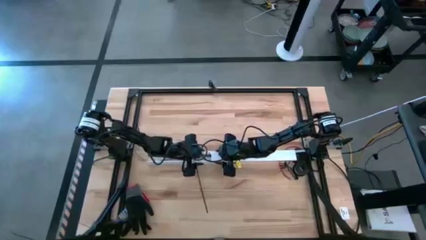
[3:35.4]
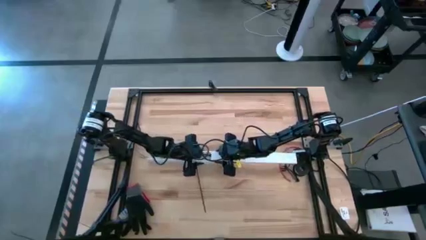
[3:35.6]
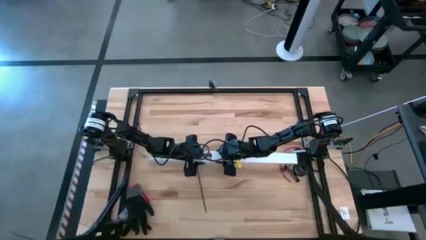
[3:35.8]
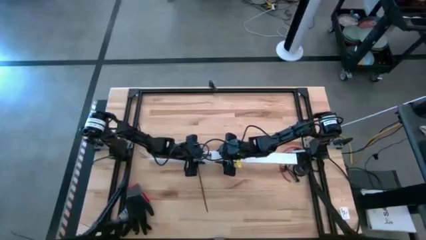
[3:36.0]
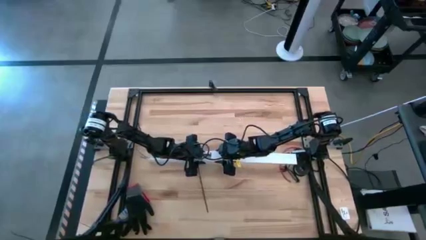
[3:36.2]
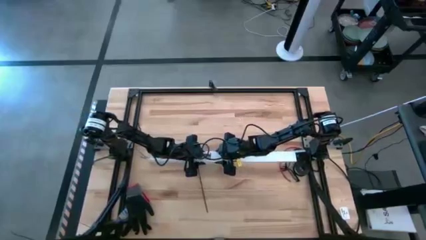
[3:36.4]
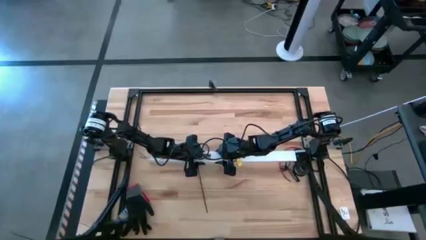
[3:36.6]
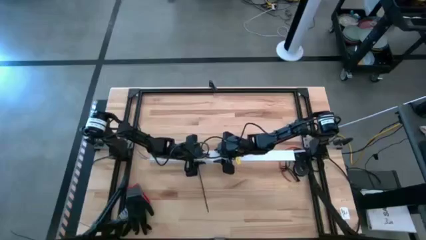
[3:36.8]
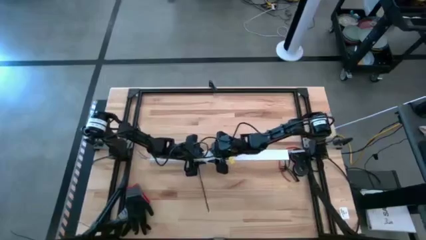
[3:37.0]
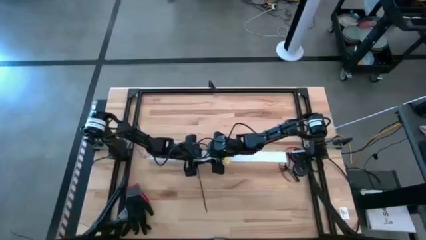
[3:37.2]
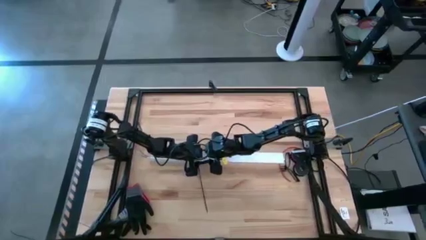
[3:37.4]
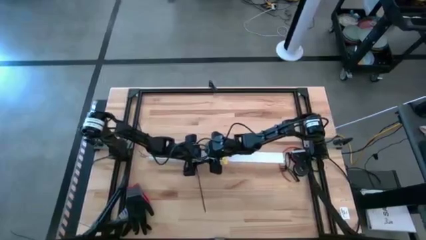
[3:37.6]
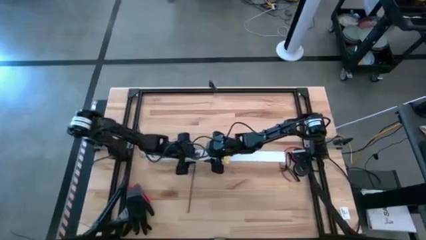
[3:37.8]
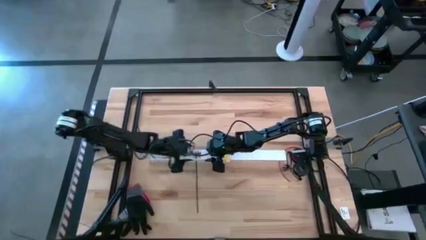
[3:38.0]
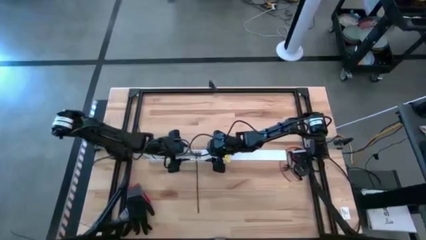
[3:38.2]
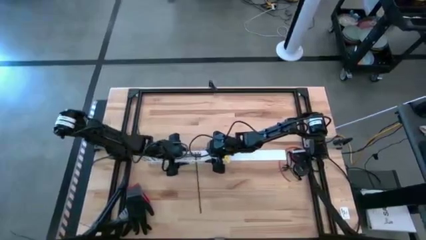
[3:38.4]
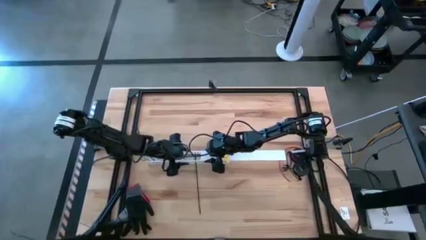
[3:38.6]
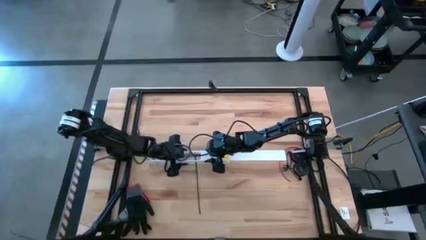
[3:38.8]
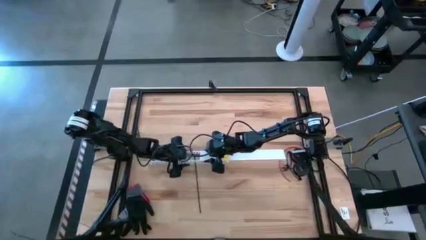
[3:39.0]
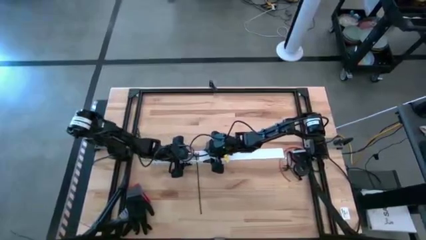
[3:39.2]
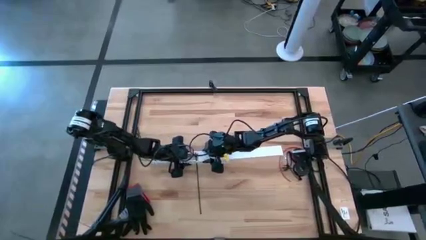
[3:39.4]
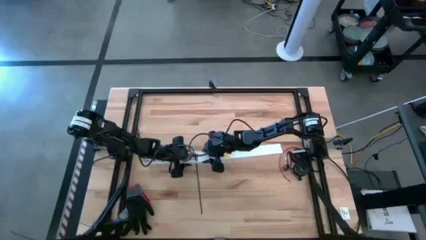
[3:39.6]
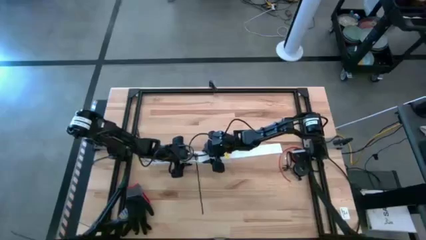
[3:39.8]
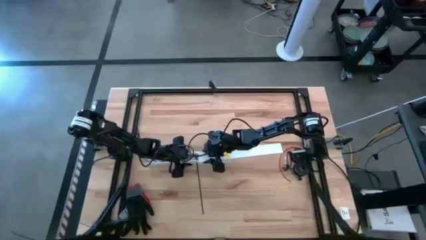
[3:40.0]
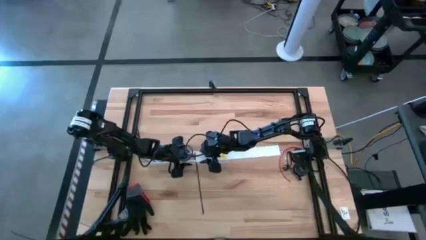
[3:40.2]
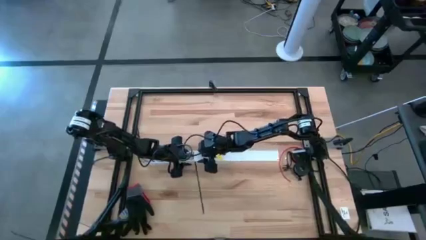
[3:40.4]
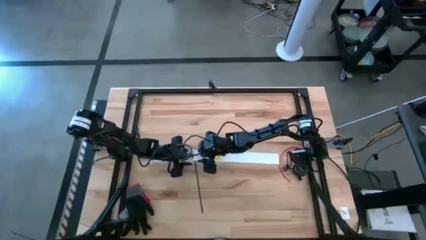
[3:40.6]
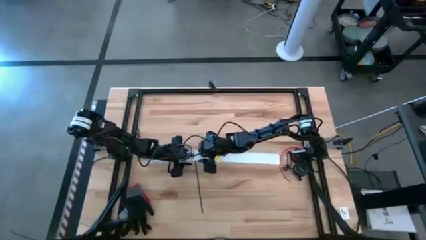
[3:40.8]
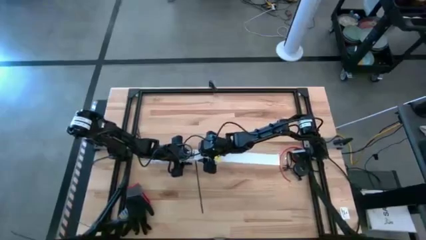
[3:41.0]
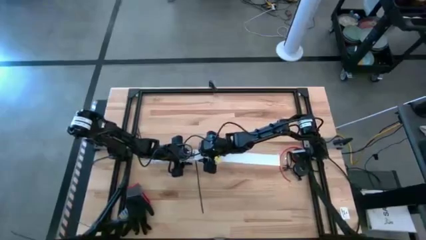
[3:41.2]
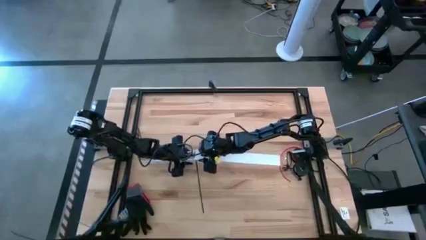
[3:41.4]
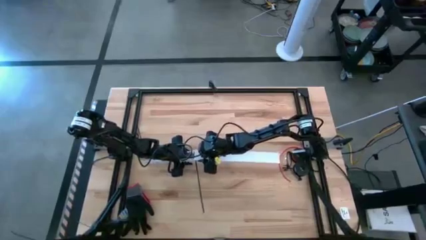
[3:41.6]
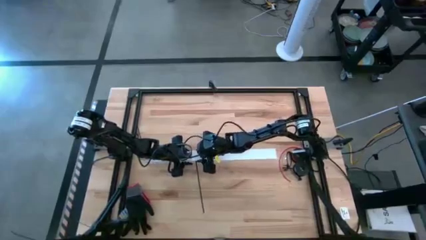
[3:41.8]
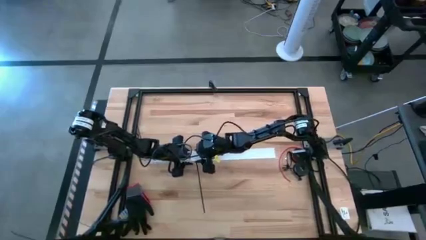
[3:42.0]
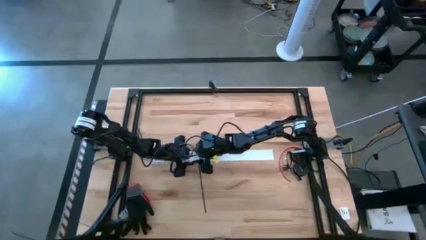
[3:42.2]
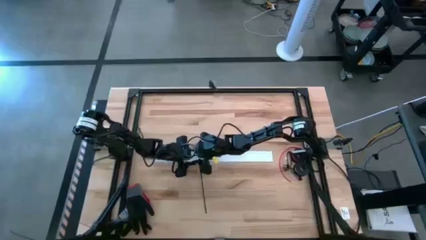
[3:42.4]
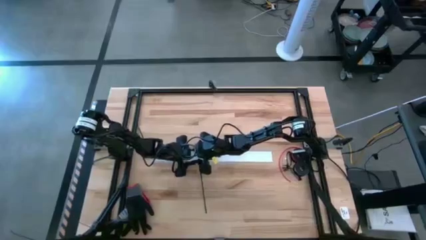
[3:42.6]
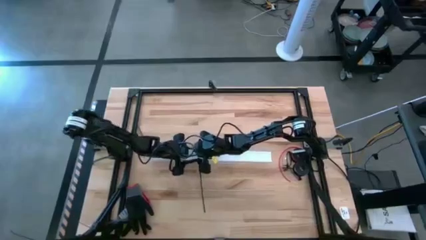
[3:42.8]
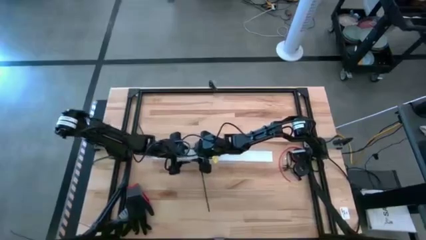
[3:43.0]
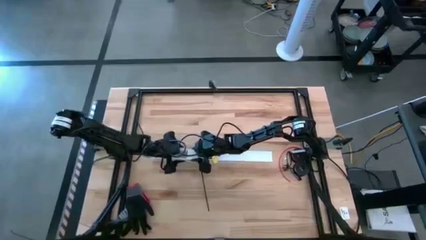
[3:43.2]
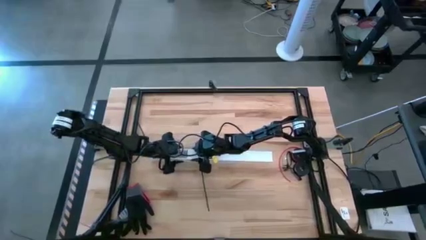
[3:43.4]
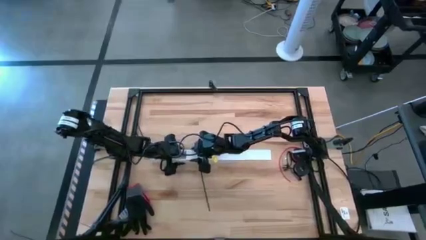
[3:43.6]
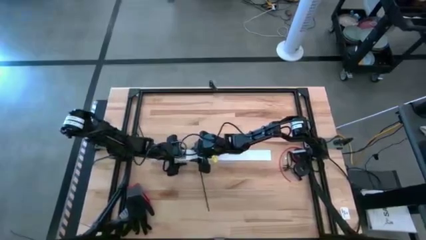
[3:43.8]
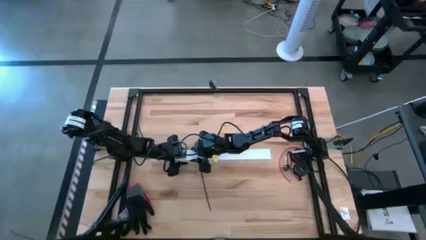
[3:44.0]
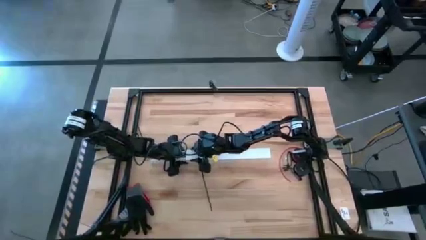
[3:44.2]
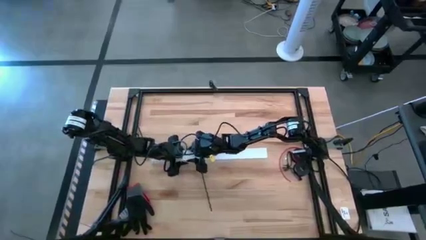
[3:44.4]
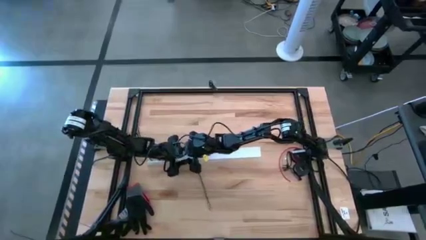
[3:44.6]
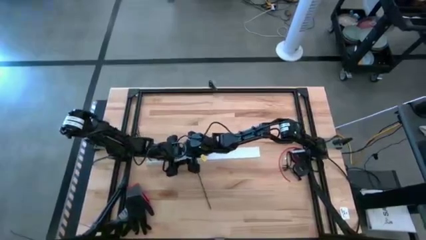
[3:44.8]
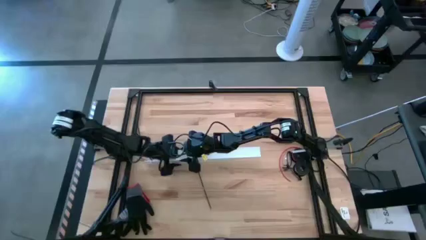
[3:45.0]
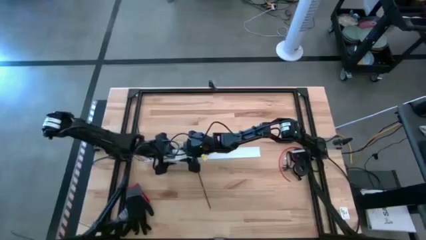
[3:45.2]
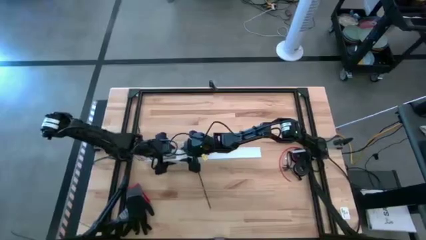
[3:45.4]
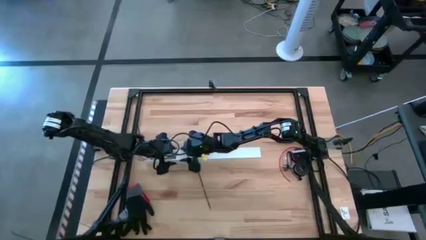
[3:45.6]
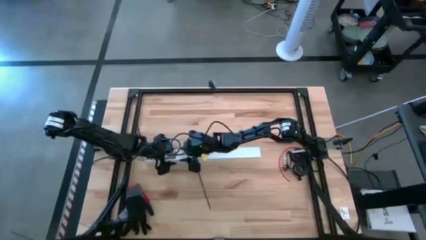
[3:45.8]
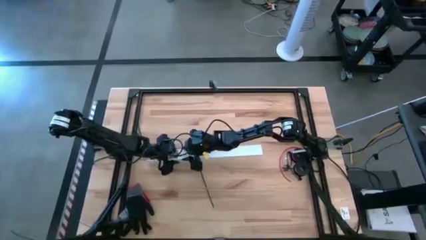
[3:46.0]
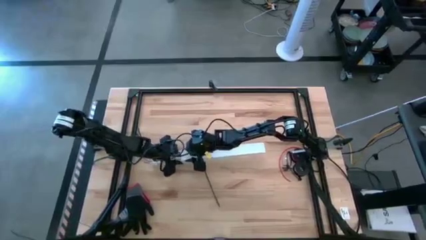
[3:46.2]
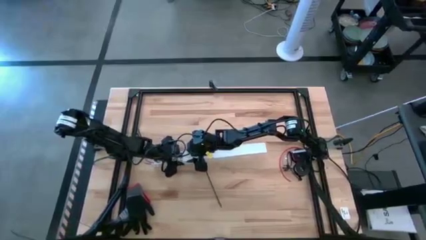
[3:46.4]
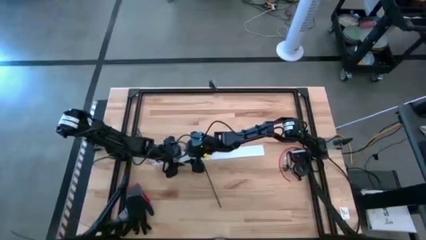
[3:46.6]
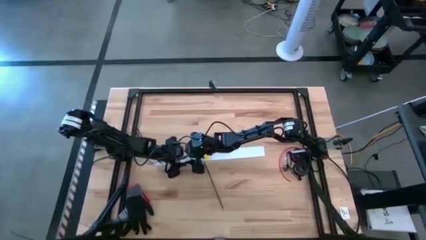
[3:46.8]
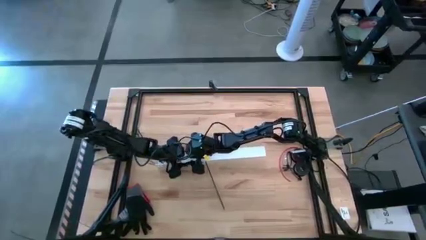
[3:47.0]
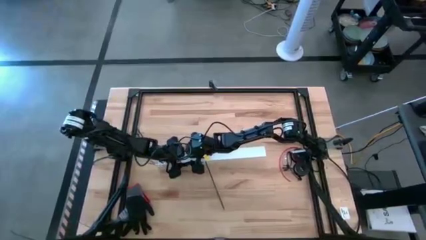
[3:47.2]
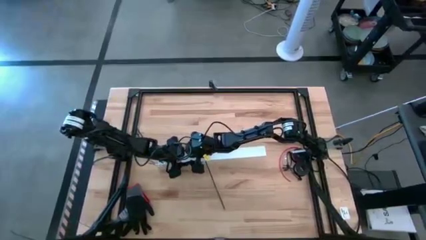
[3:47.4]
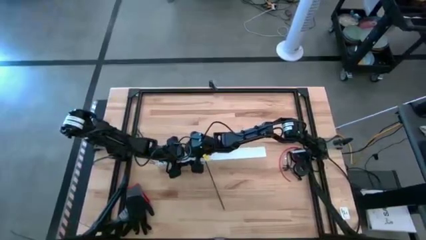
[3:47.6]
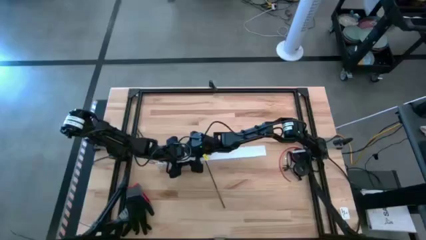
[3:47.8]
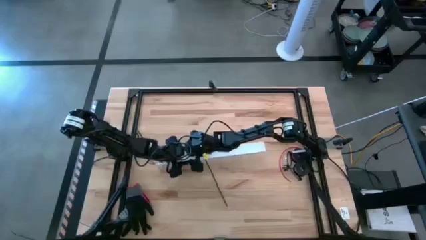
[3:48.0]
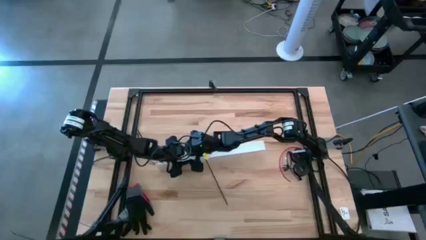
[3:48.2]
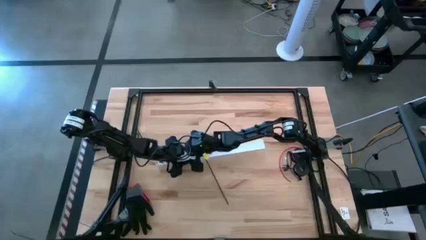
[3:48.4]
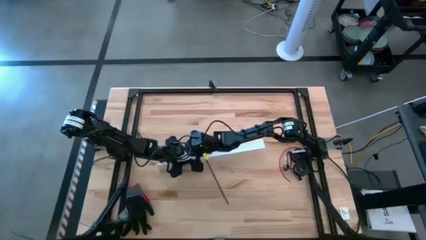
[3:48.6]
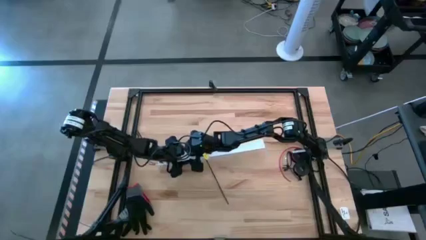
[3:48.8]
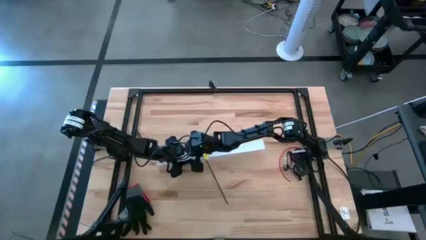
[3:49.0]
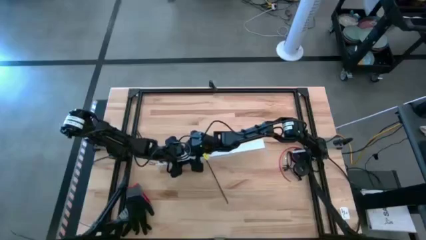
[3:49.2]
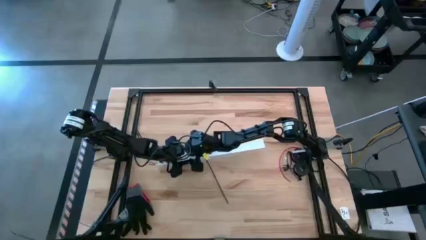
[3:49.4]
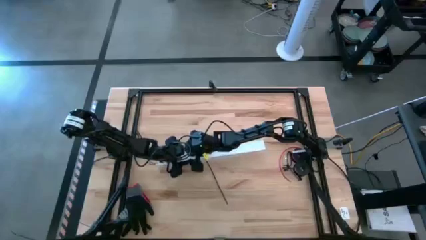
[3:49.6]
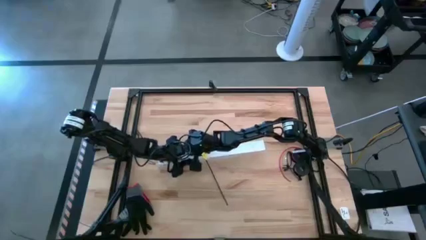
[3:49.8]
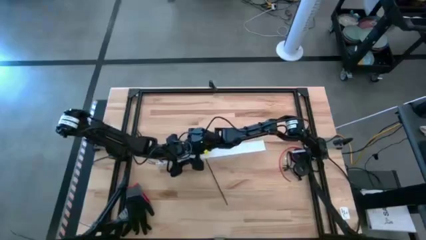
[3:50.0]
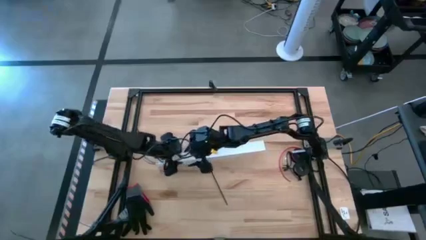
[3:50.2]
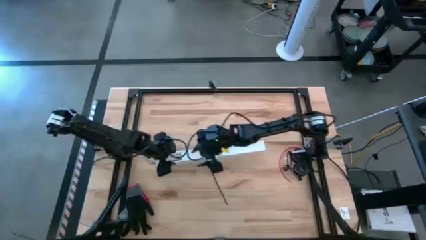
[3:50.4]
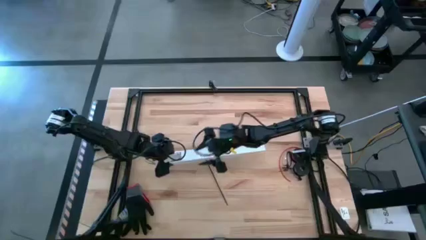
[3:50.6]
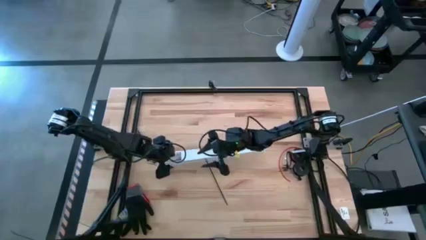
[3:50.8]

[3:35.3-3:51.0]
Task: Ziptie cables
Close the white cable duct

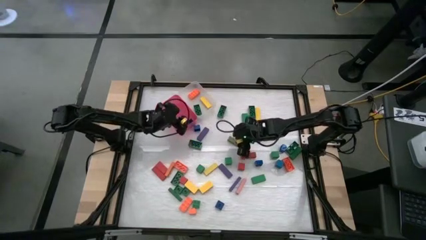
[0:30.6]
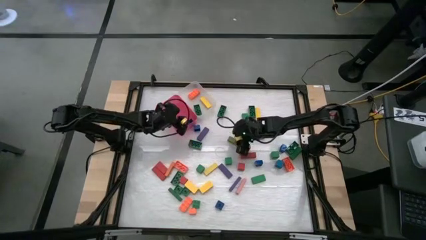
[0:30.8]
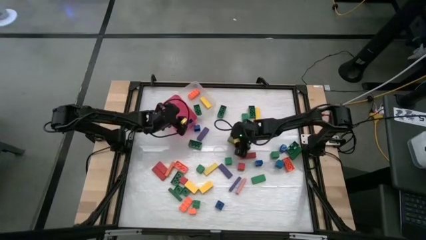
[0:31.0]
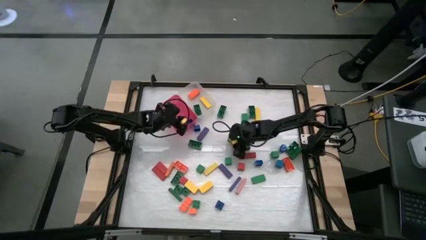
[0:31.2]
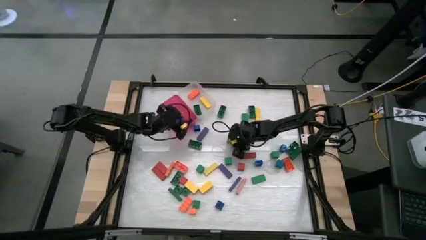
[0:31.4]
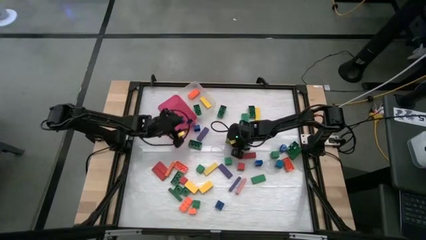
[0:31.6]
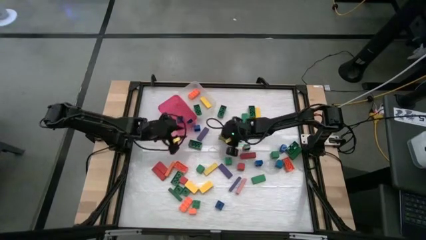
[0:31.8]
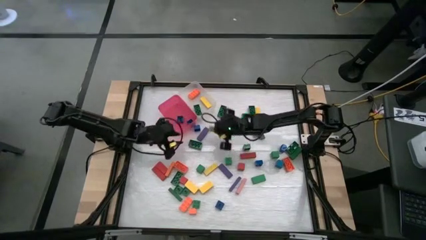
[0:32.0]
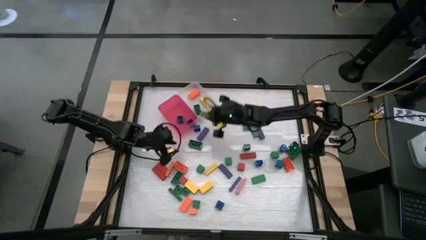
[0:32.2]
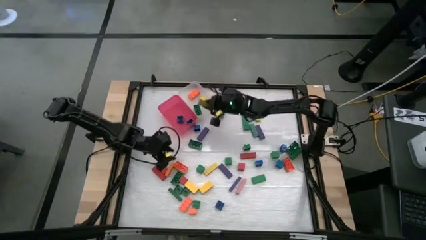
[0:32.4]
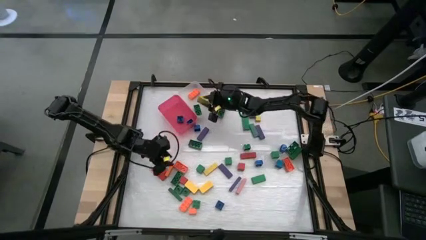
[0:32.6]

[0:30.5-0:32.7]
Task: Sort blocks by size
Put the big light green block into the white bin
